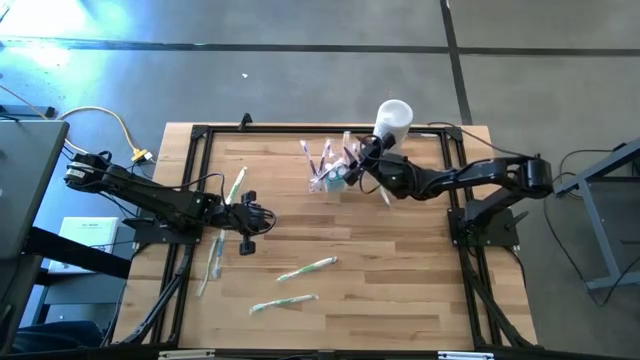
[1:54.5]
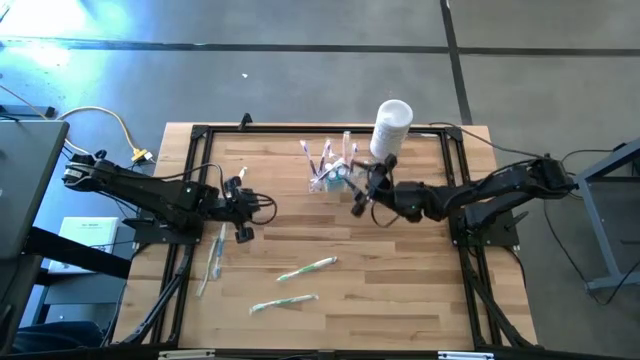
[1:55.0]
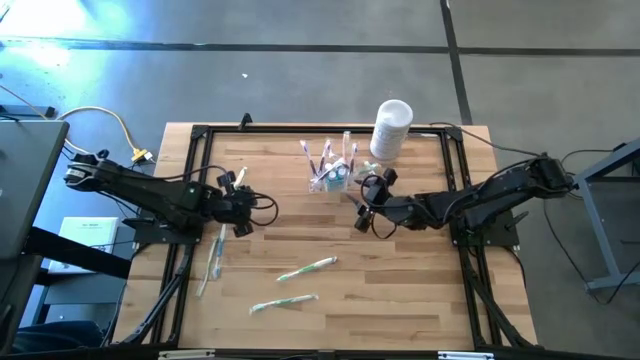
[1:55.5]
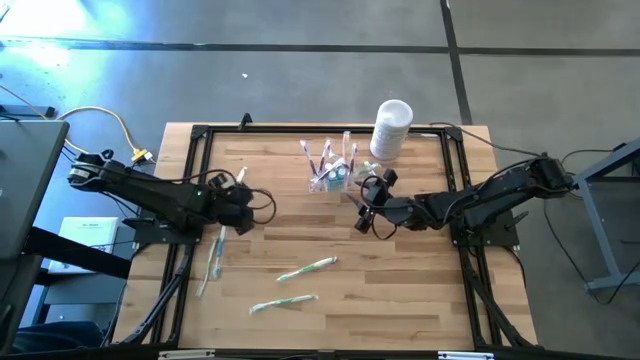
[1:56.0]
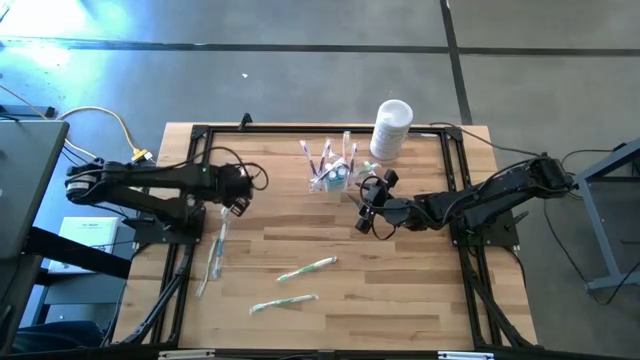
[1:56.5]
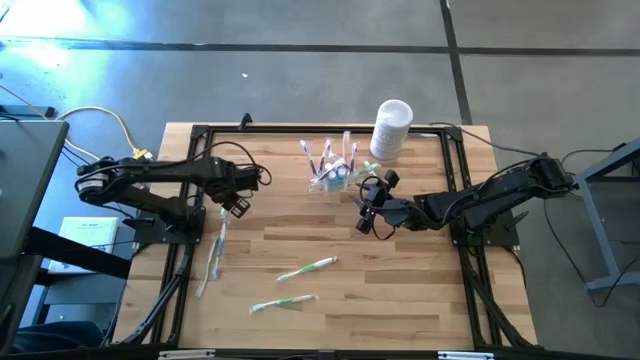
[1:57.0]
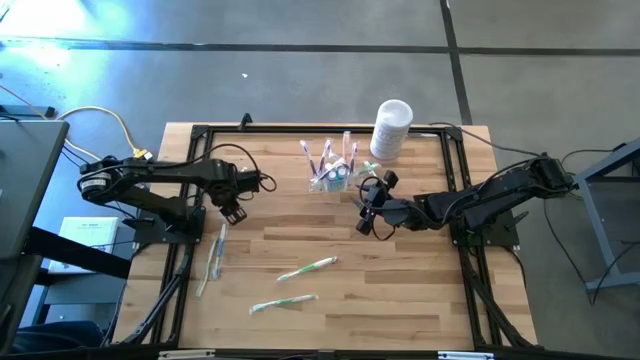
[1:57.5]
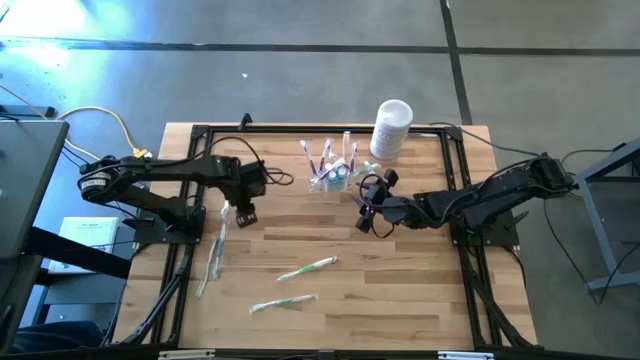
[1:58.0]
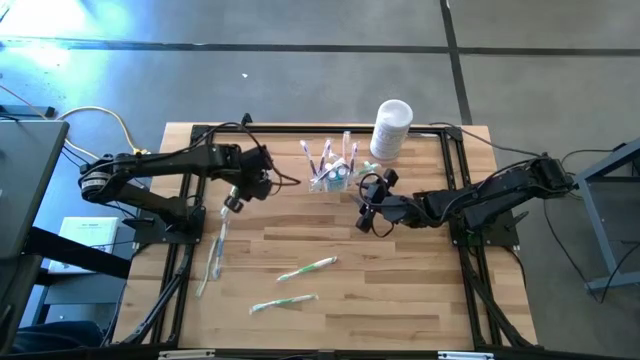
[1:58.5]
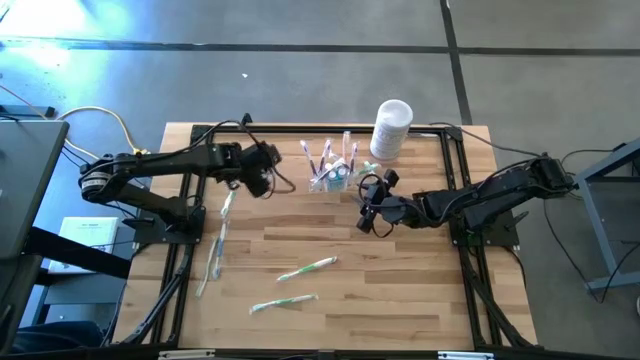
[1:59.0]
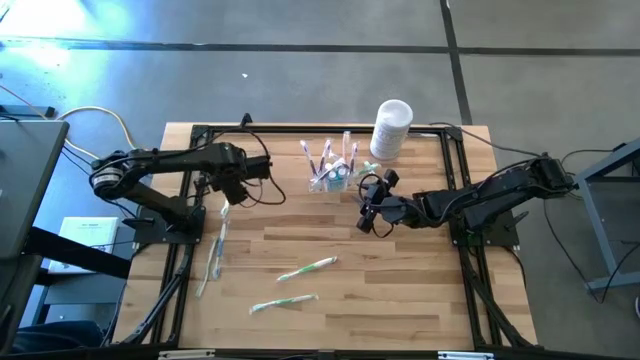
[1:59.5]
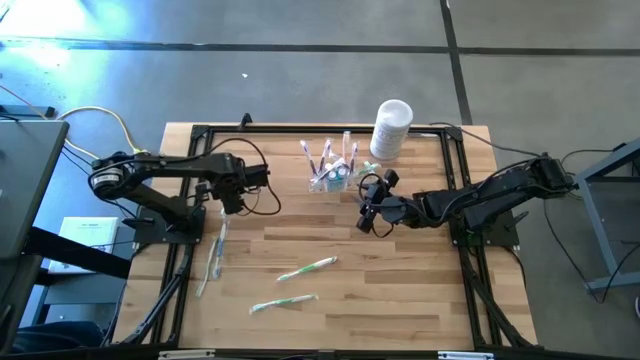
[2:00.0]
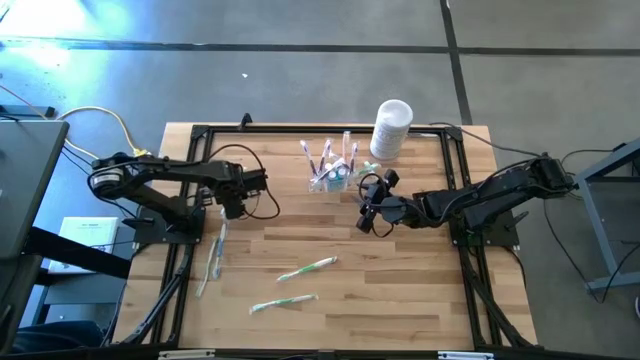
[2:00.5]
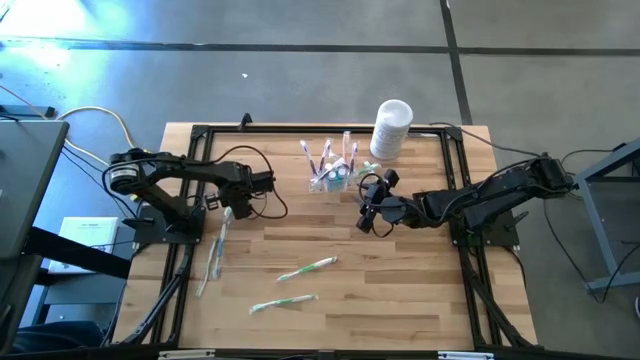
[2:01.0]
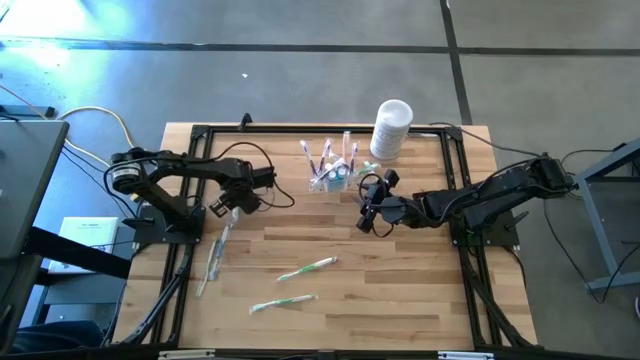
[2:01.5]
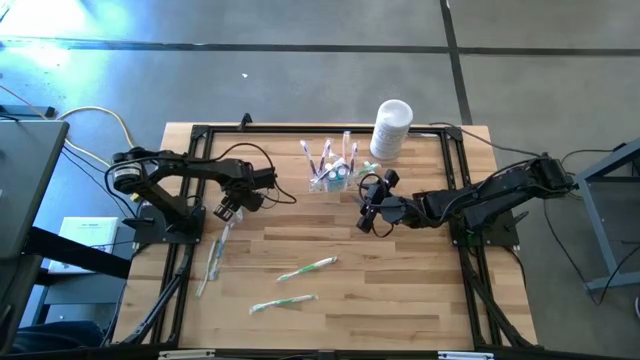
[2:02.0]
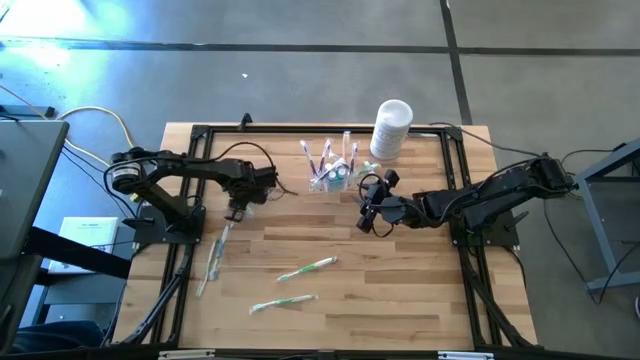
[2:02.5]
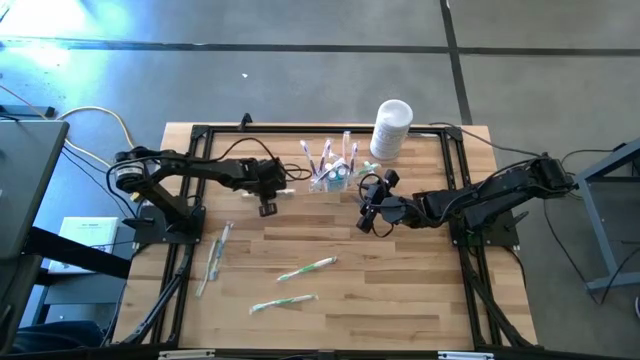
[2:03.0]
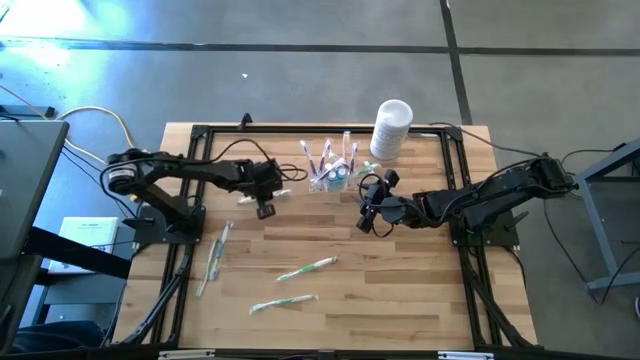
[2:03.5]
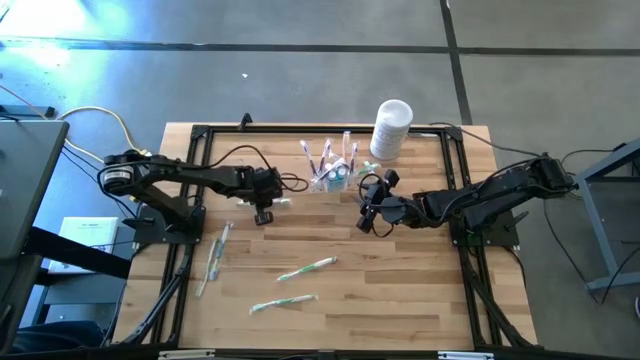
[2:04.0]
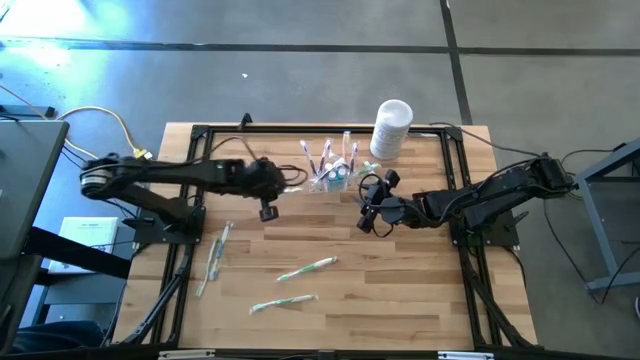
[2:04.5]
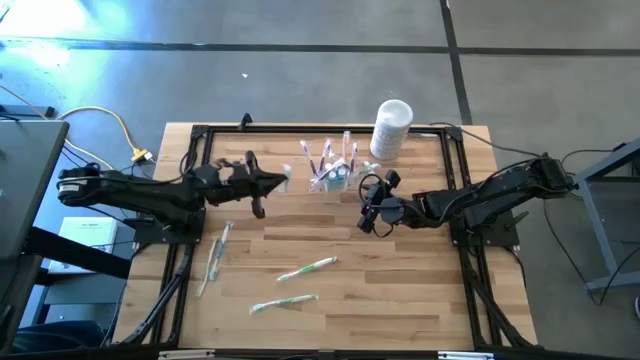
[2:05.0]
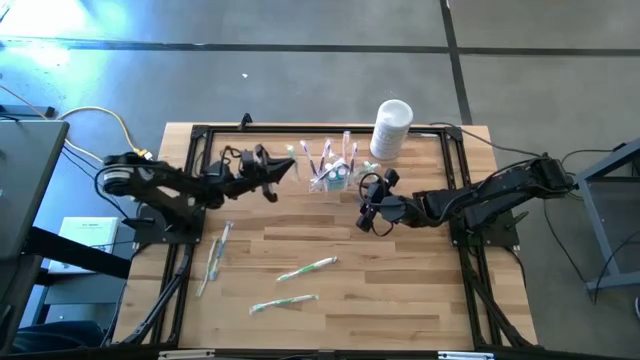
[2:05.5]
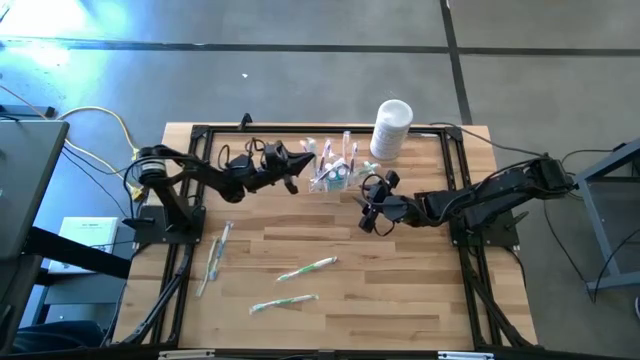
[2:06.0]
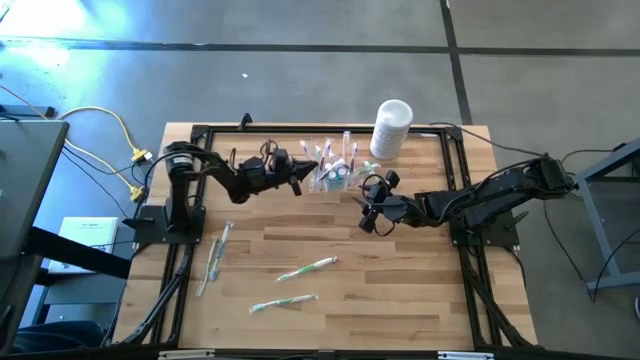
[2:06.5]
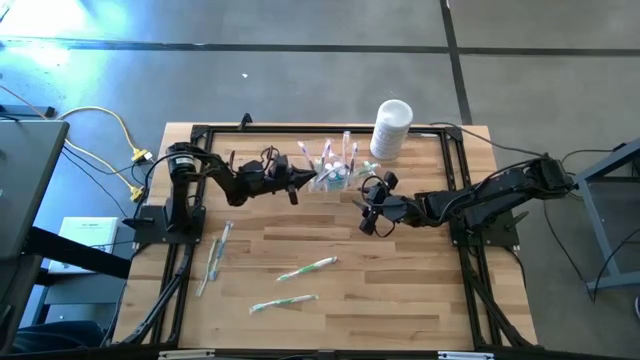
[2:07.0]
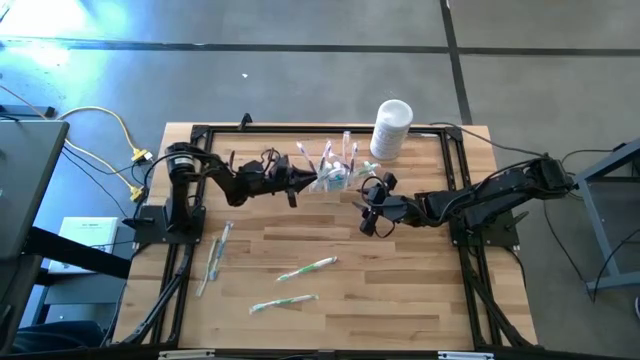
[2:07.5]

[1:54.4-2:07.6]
Task: Pick & Place toothbrushing station
Put the green toothbrush into the transparent organizer

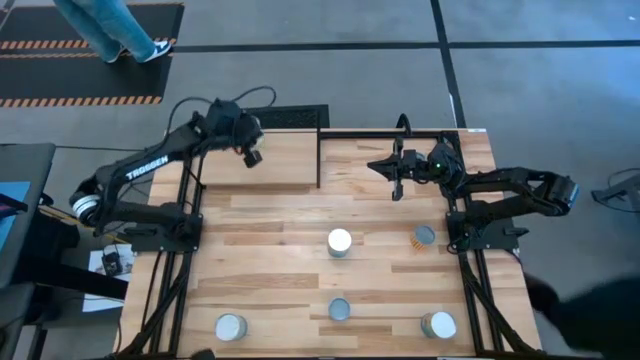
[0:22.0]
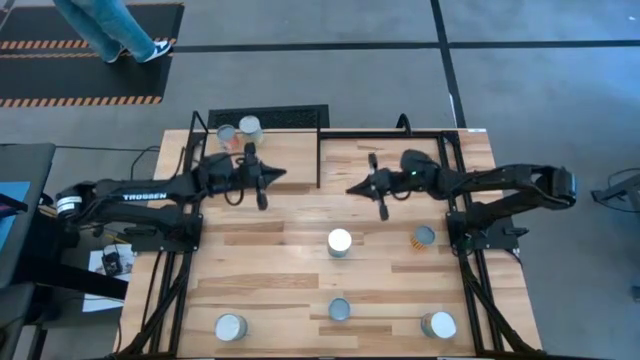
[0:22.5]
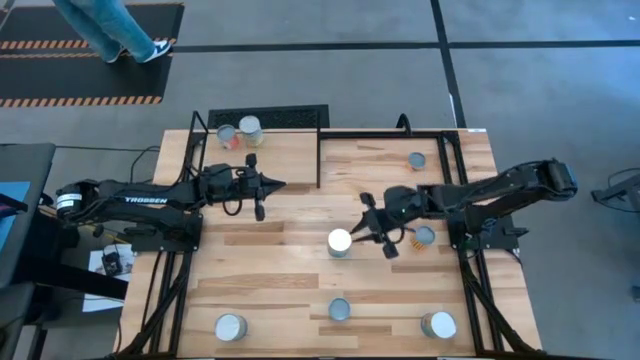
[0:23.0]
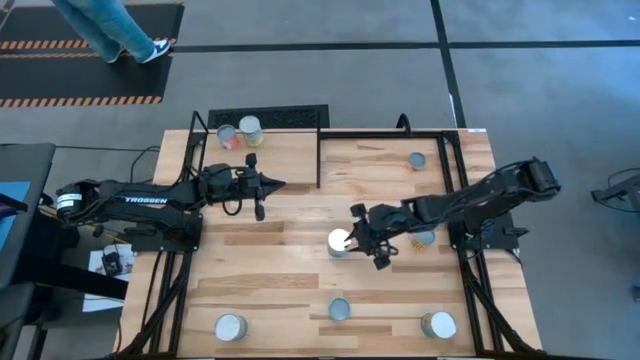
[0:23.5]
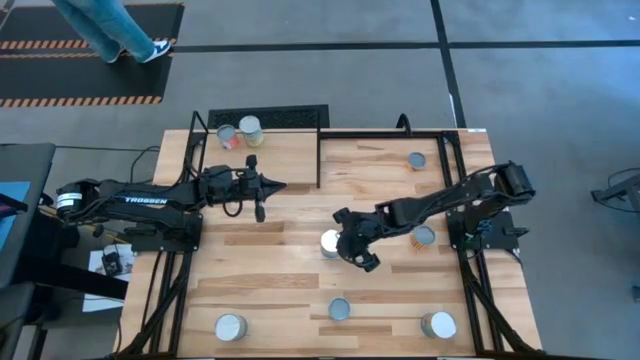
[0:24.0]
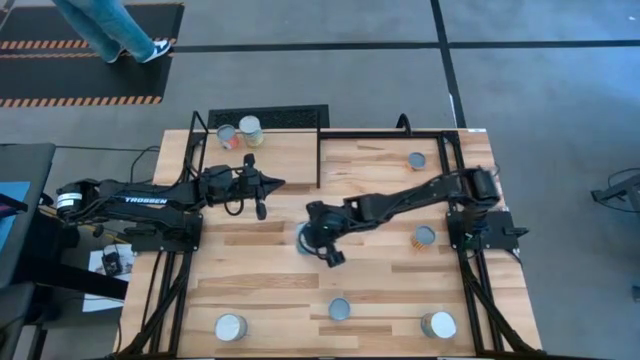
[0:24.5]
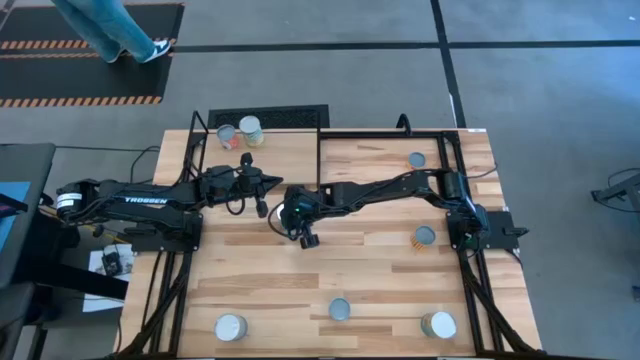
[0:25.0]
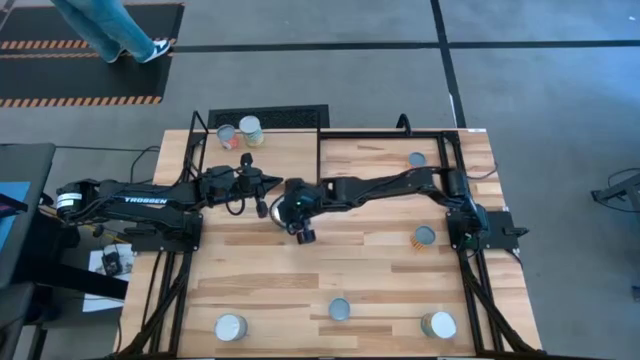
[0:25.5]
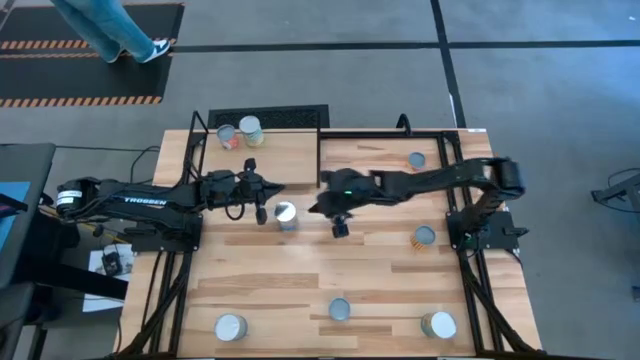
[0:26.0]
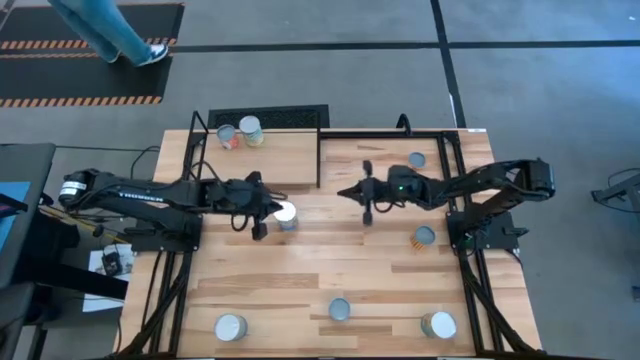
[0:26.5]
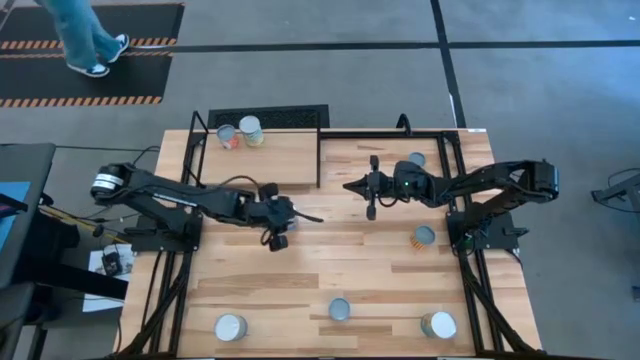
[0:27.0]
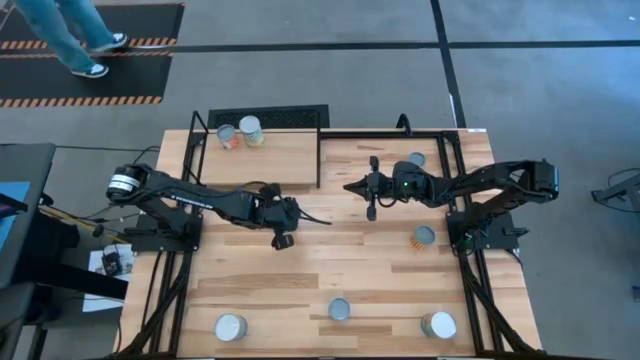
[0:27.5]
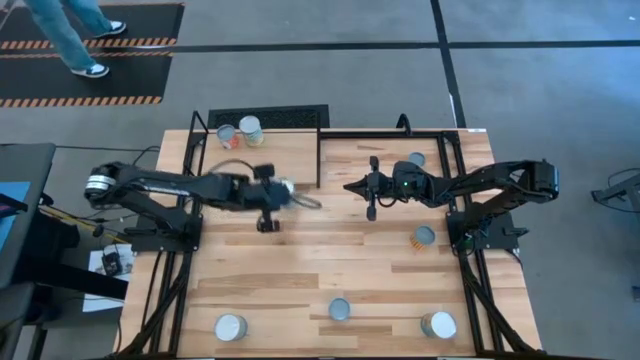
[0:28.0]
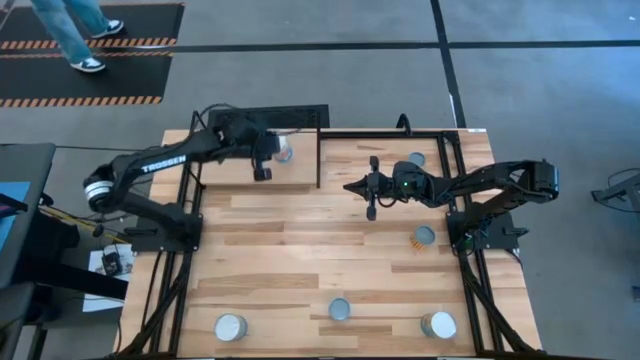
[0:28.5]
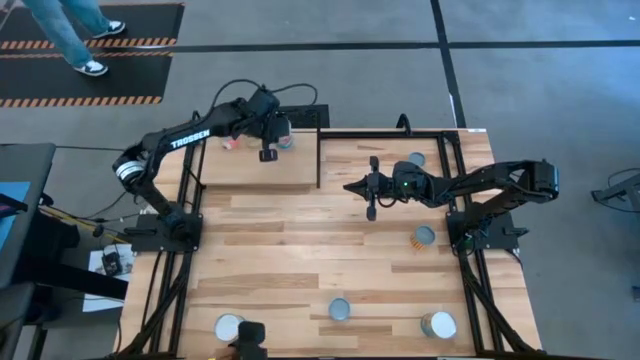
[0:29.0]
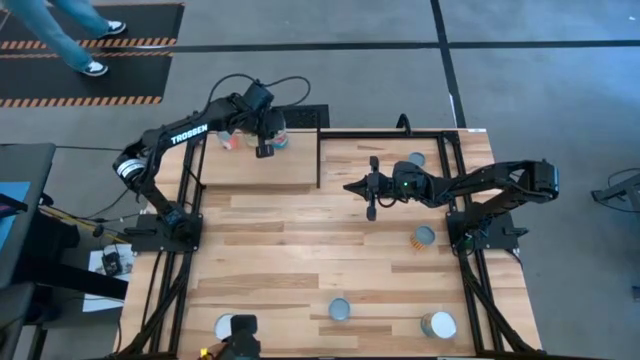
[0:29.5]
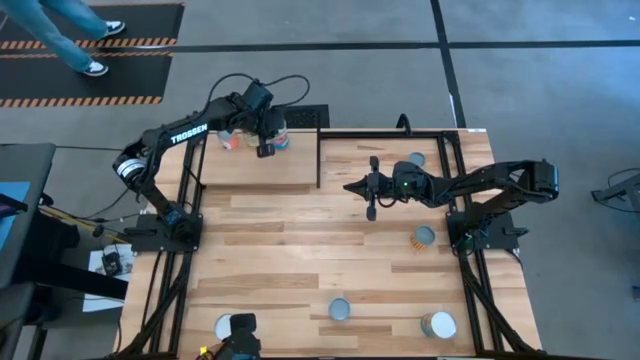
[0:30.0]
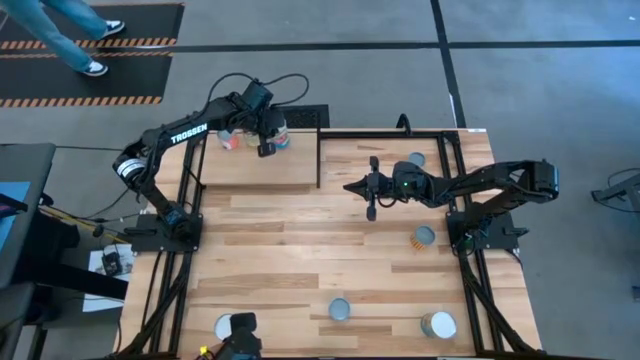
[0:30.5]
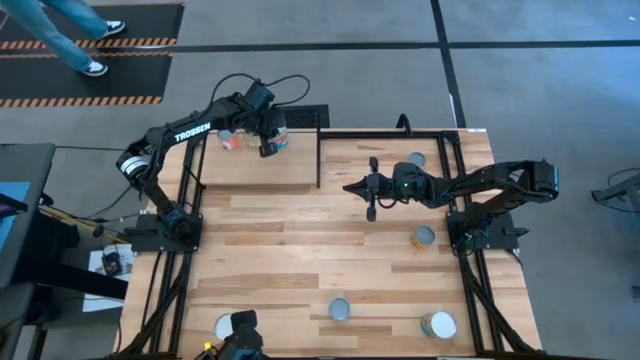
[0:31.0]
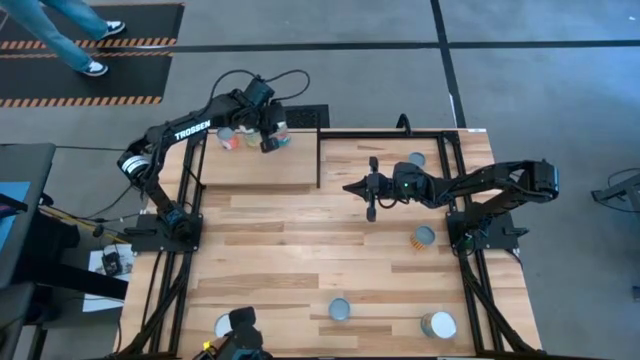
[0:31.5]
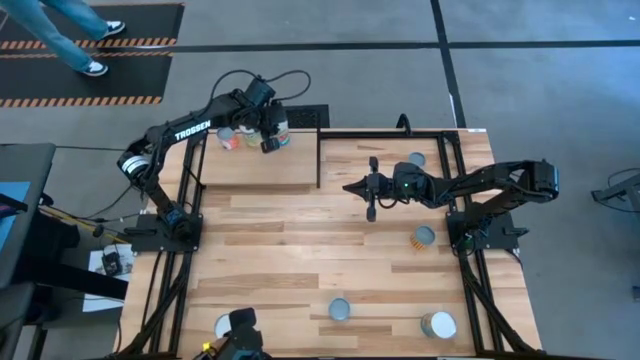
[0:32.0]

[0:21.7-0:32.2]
Task: Pick and place cans onto a shelf
Put the large canned tomatoes on the shelf
